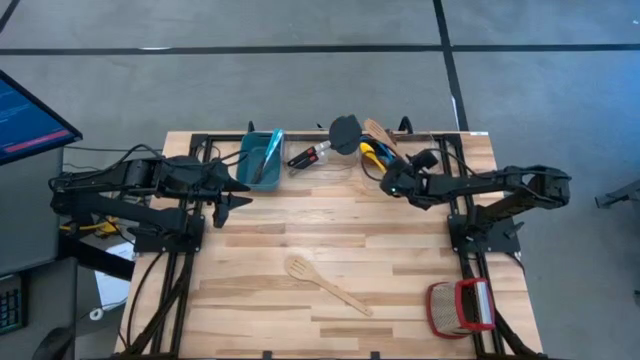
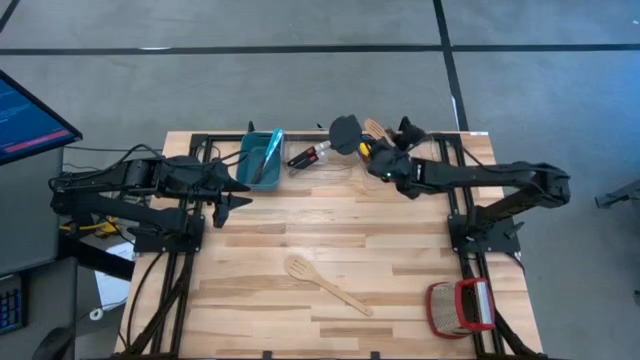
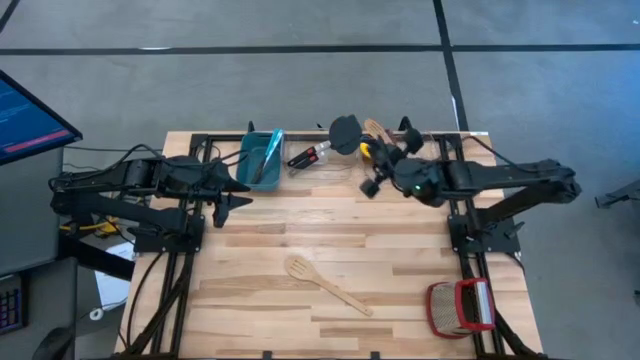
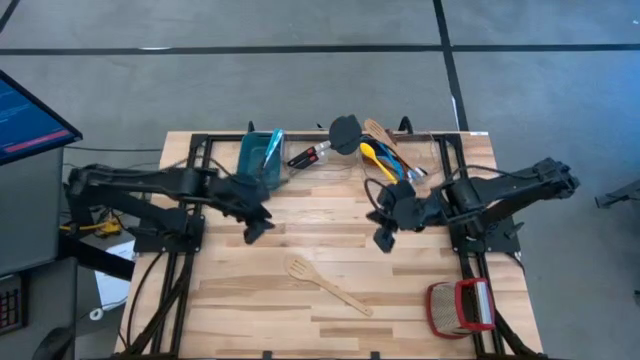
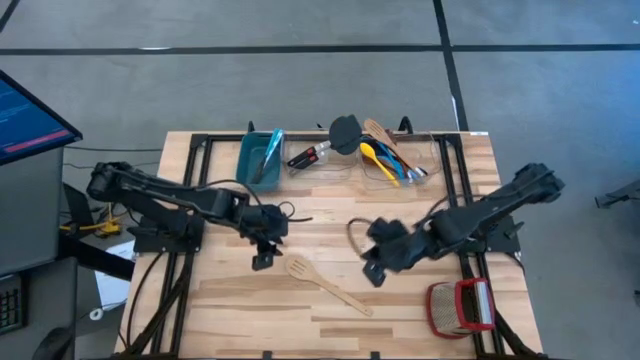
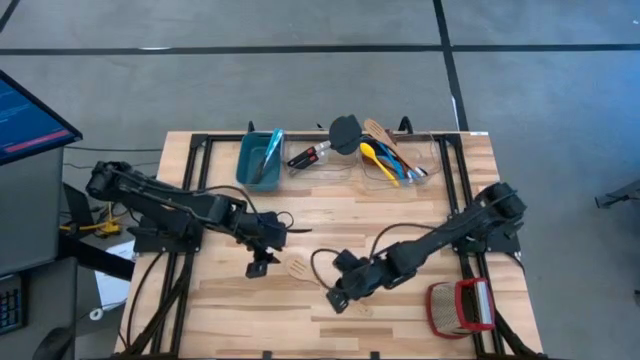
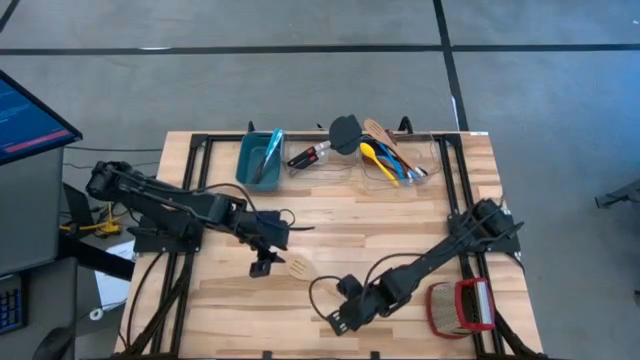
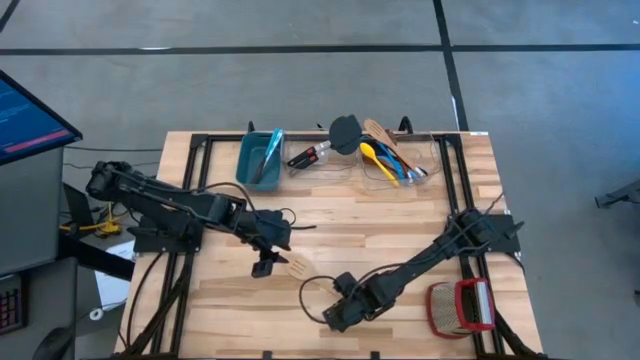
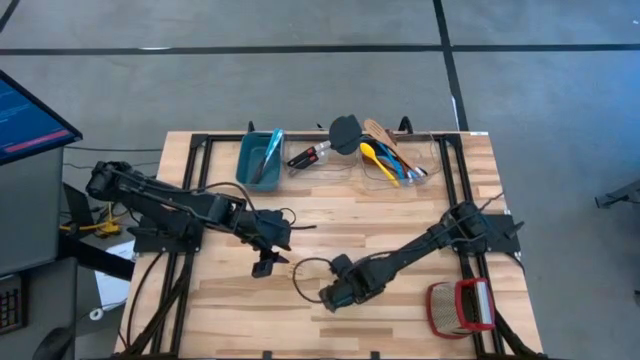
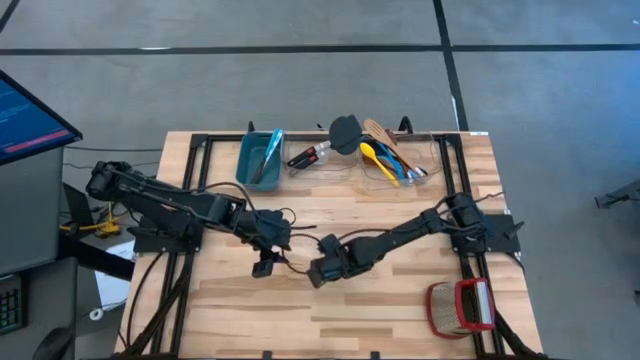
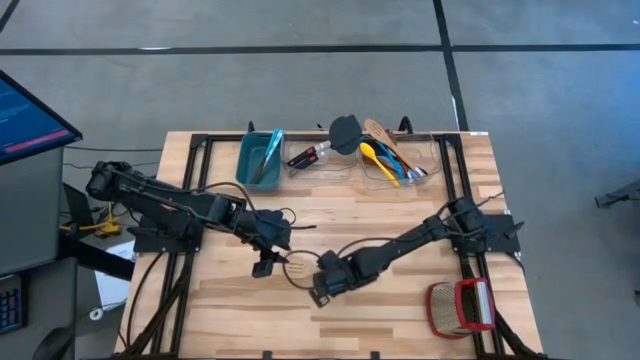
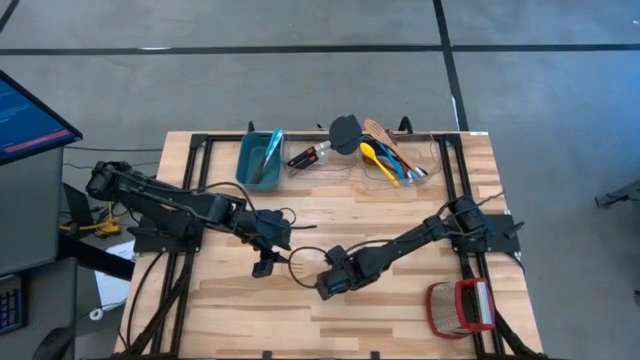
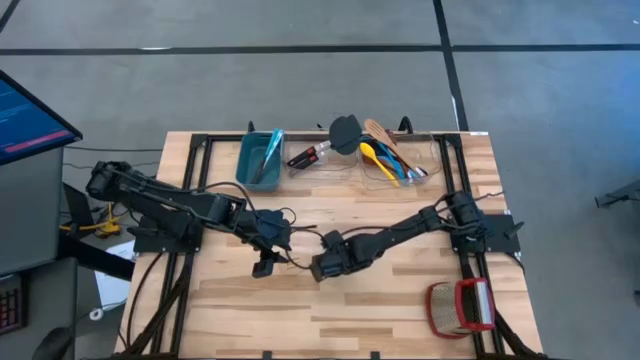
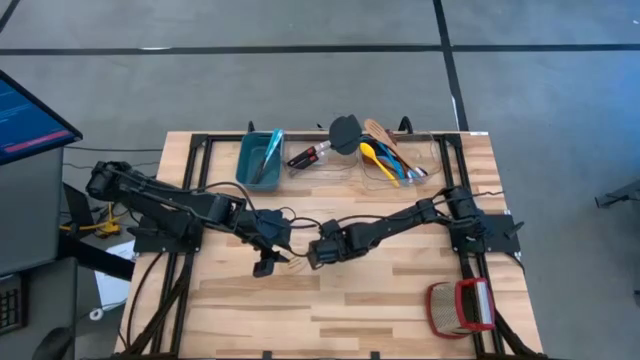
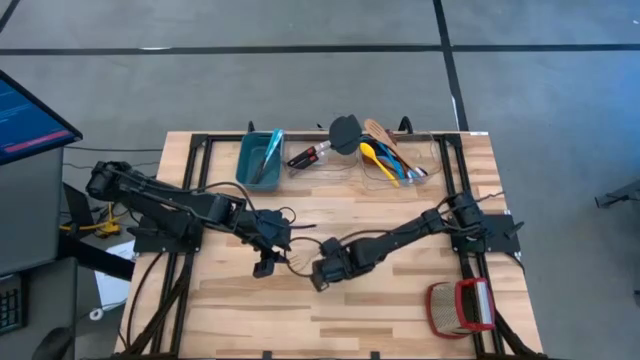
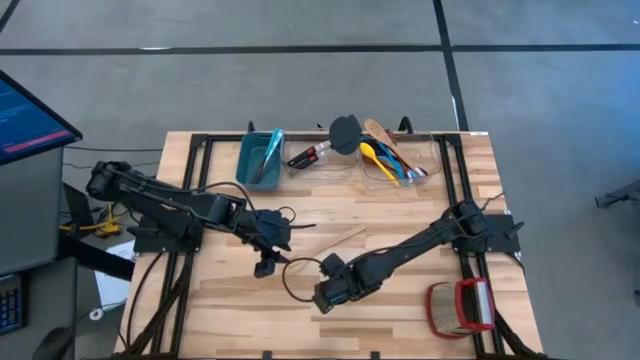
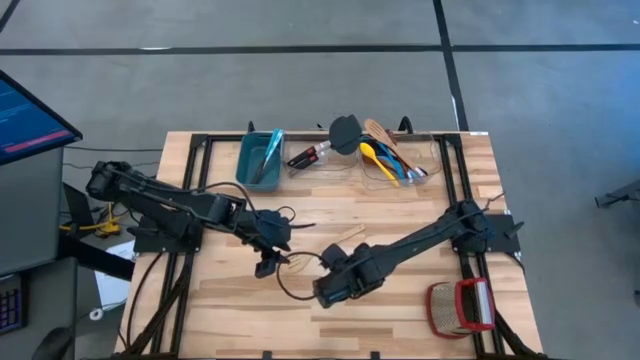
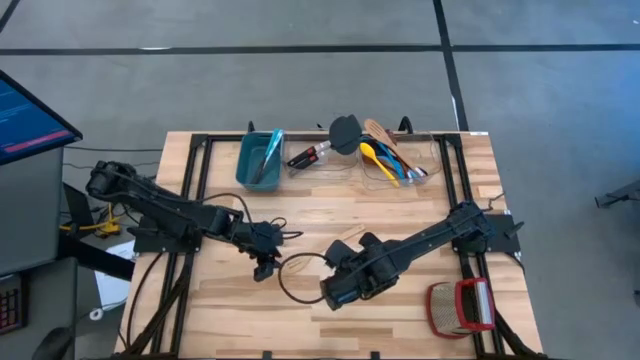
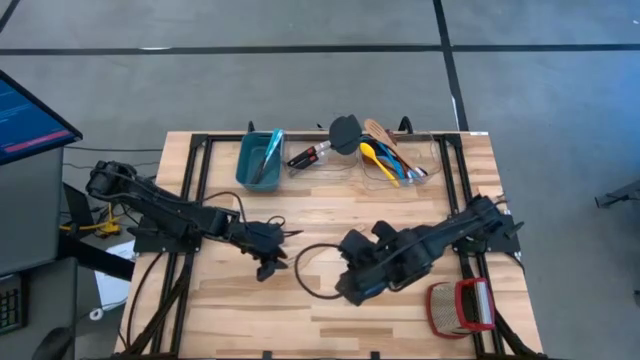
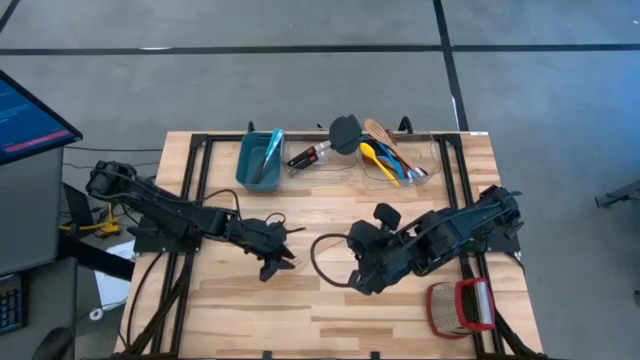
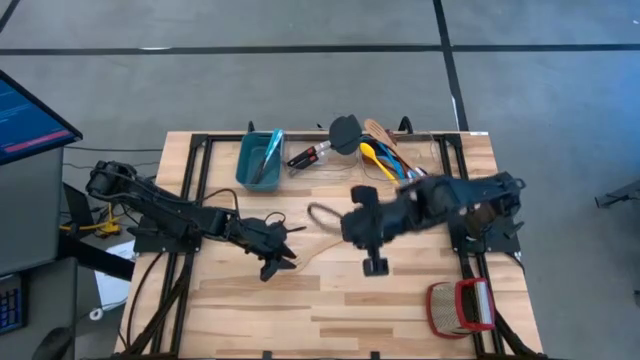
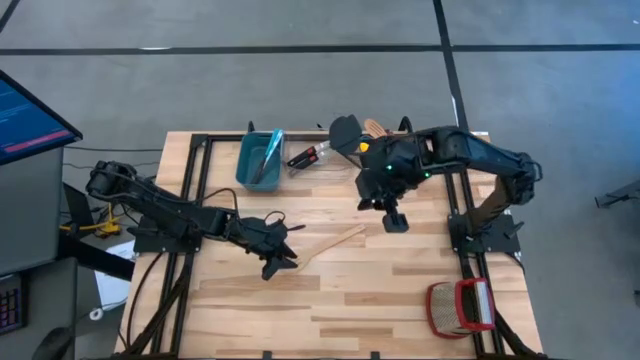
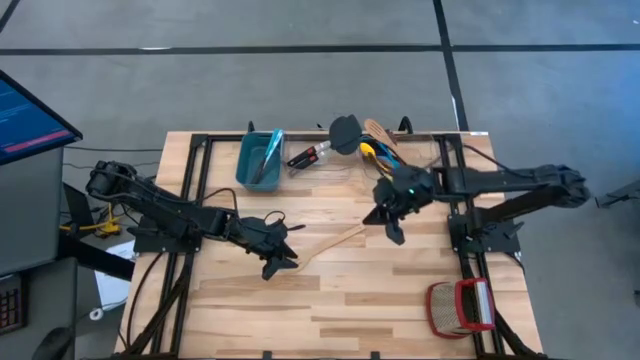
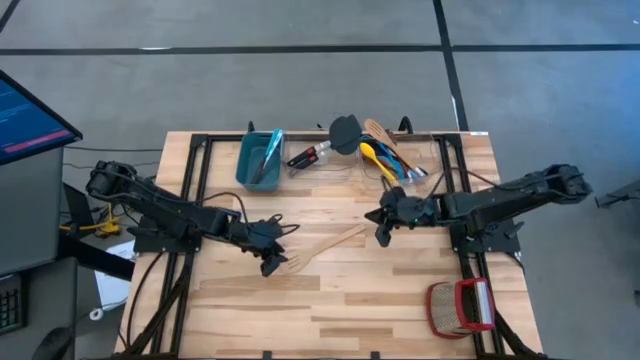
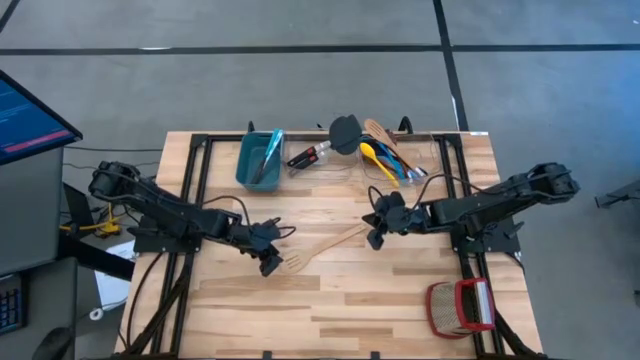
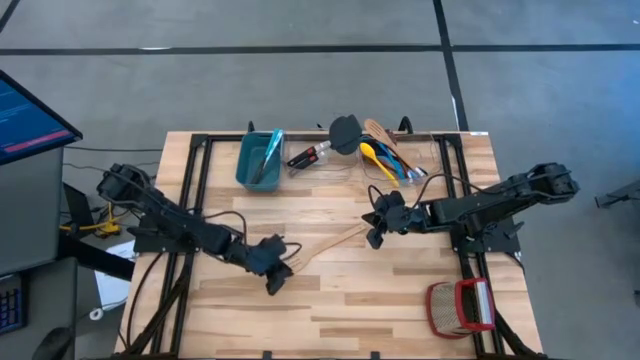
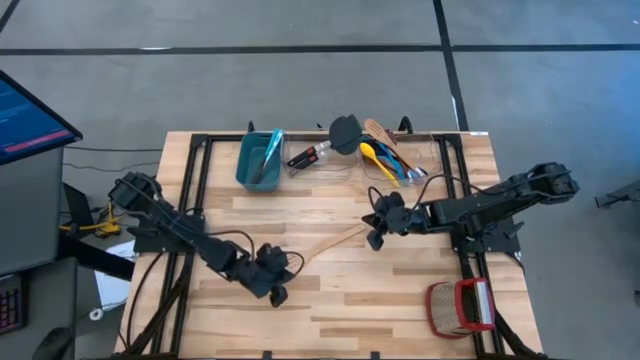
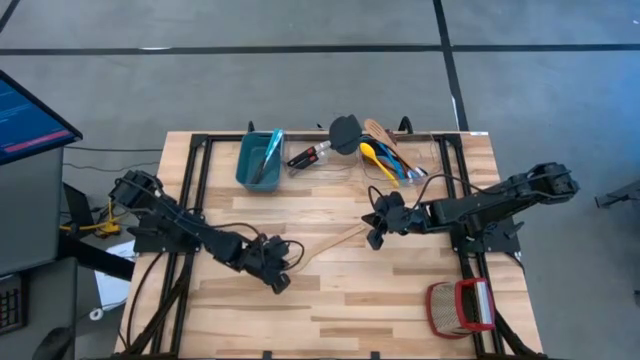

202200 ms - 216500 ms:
Task: Pick & Place Kitchen Items
Put the brown slotted serving spoon into the right transparent bin

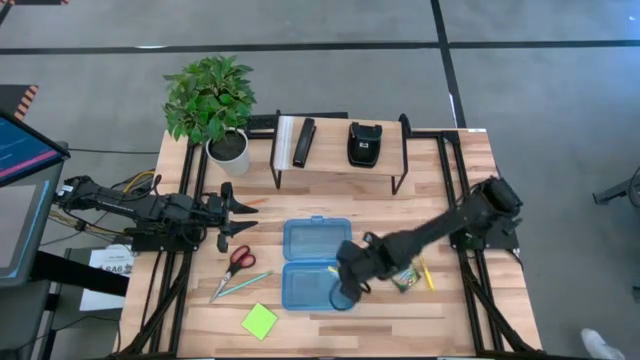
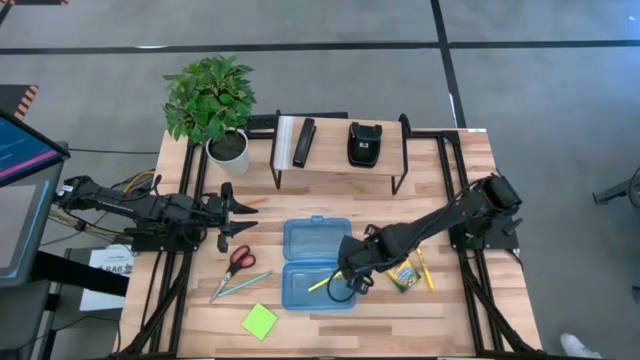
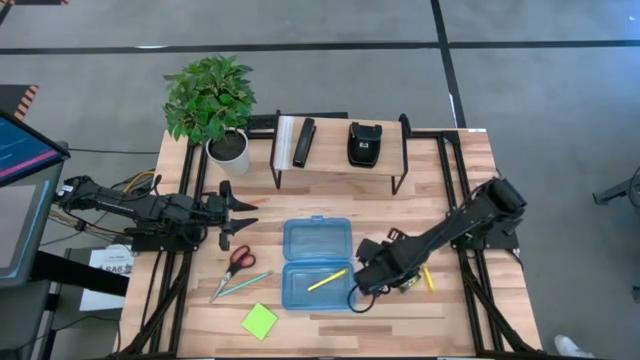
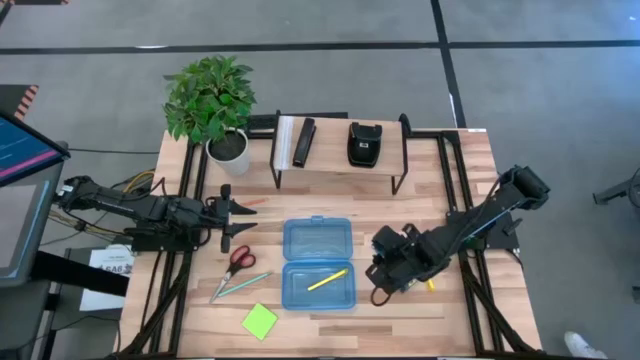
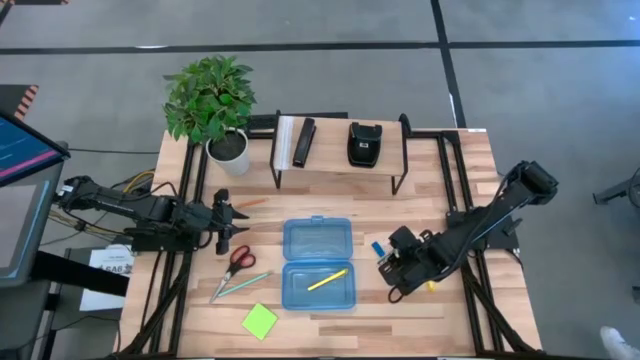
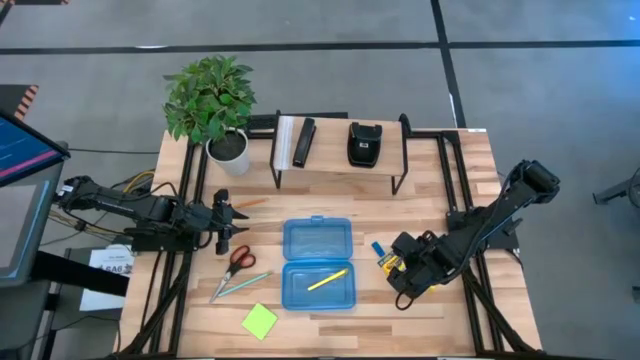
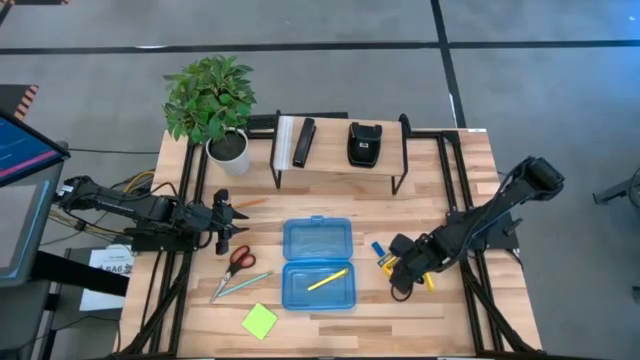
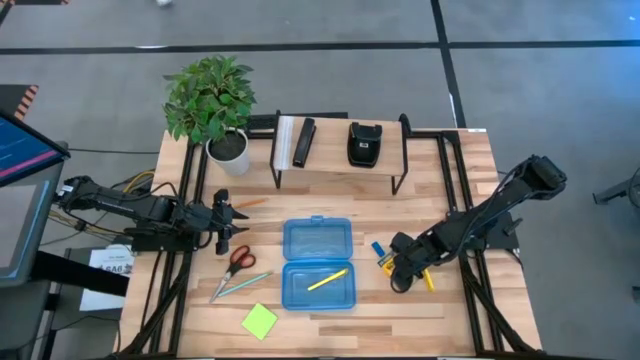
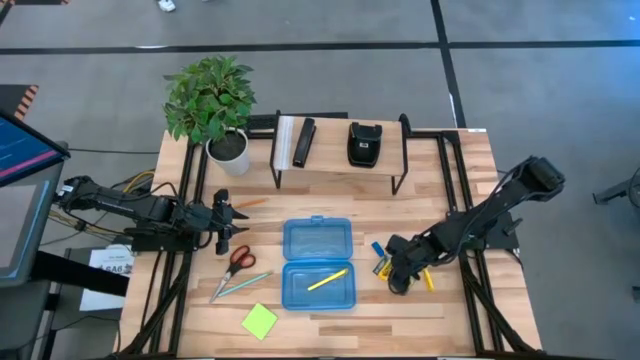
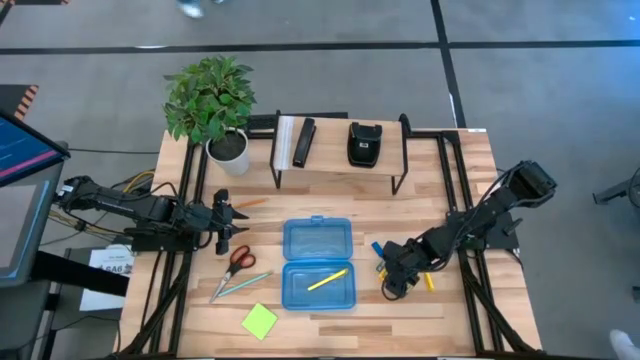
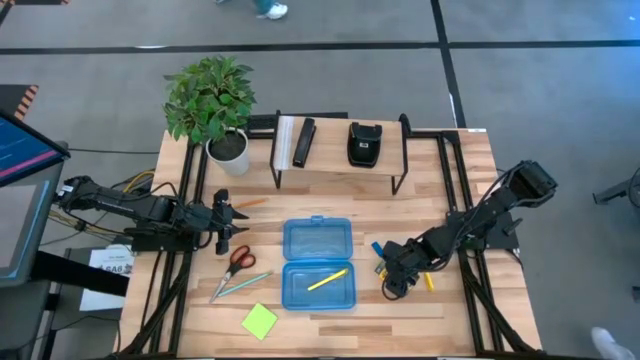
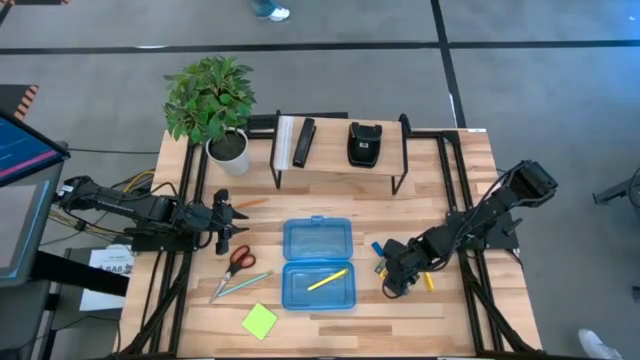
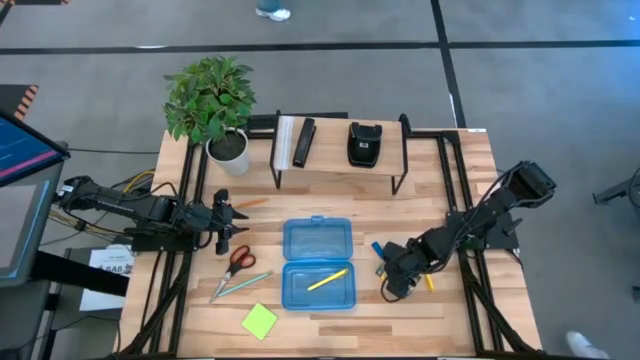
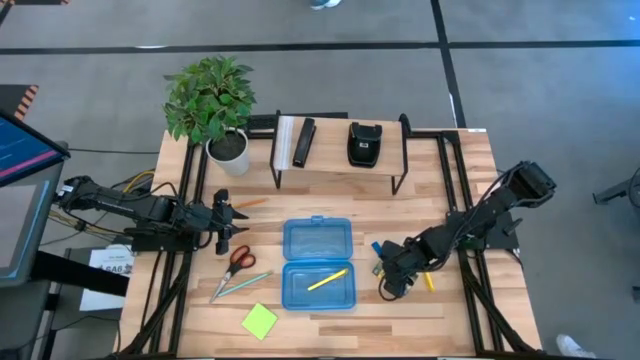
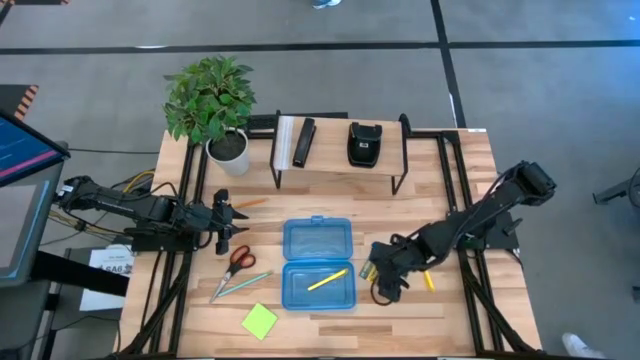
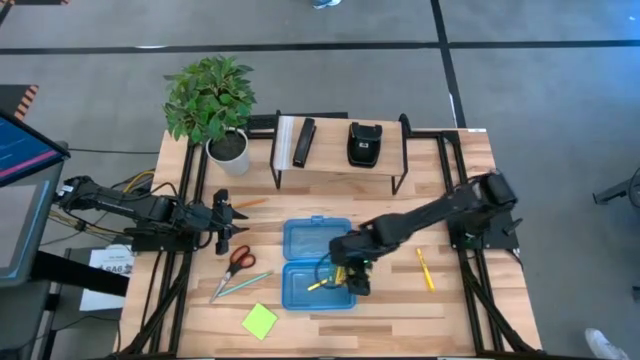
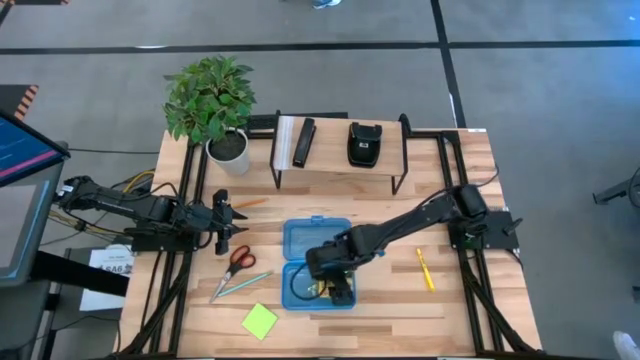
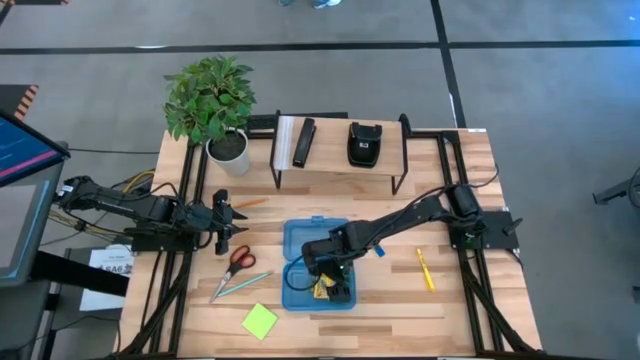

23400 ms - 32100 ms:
Task: Pack school essentials
Put the yellow box of crayons into the blue supply box
